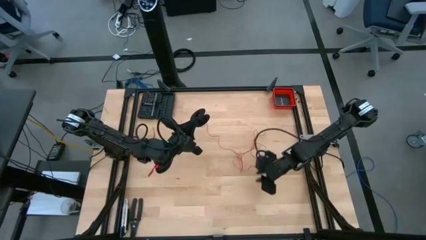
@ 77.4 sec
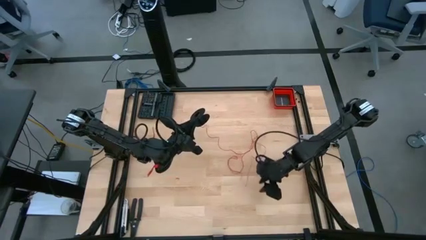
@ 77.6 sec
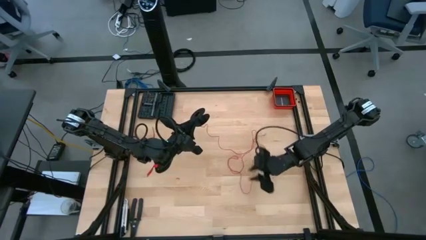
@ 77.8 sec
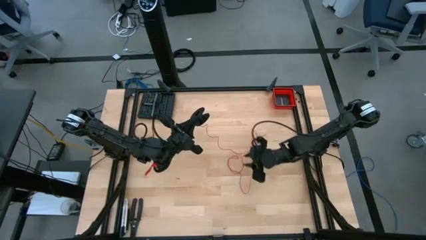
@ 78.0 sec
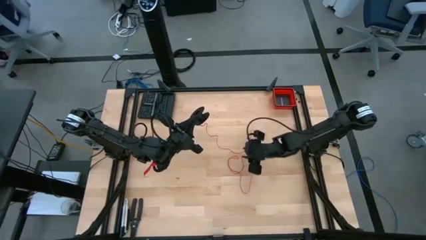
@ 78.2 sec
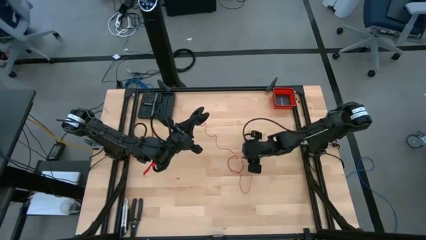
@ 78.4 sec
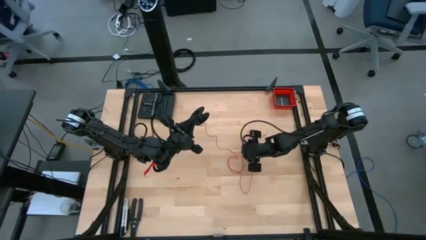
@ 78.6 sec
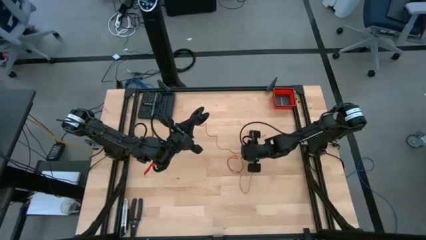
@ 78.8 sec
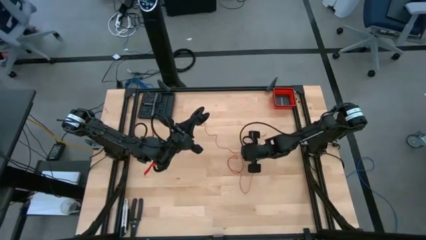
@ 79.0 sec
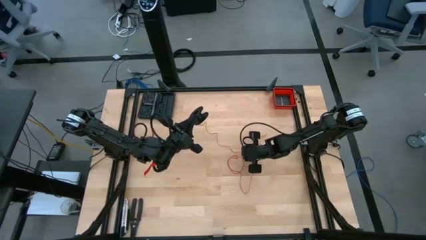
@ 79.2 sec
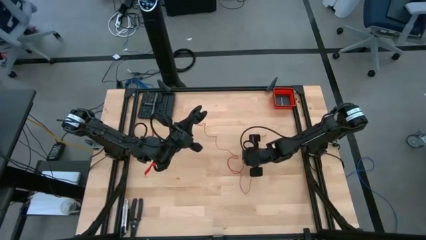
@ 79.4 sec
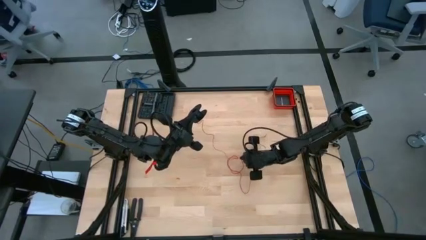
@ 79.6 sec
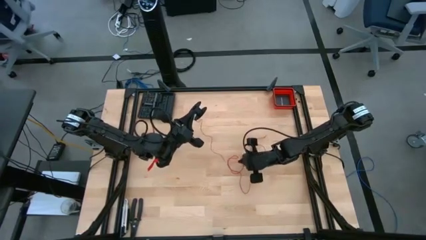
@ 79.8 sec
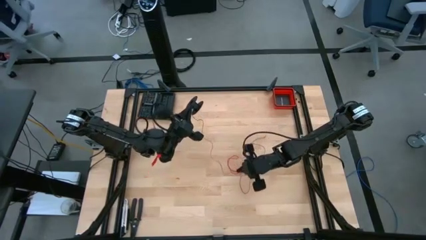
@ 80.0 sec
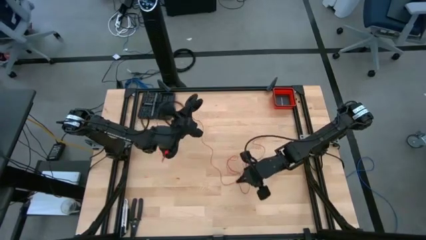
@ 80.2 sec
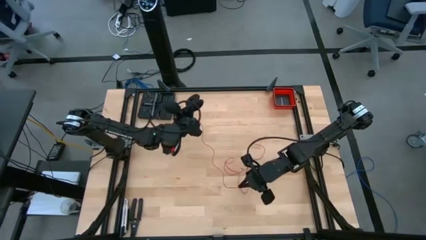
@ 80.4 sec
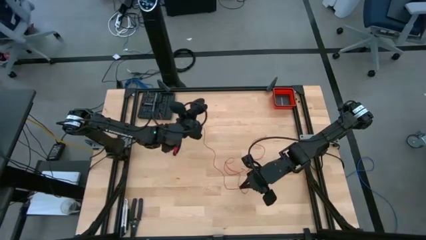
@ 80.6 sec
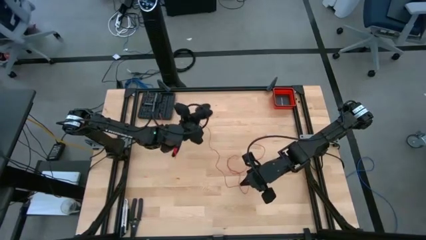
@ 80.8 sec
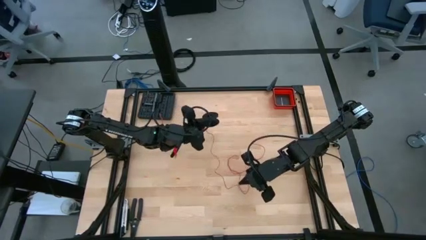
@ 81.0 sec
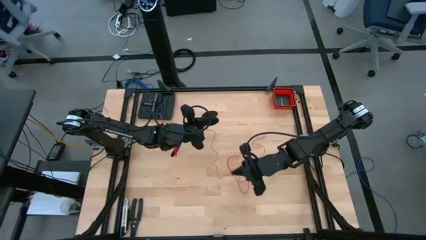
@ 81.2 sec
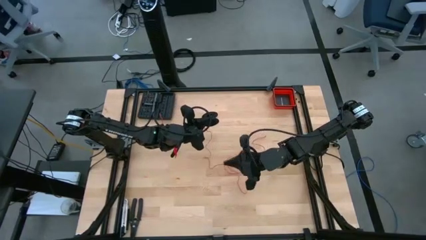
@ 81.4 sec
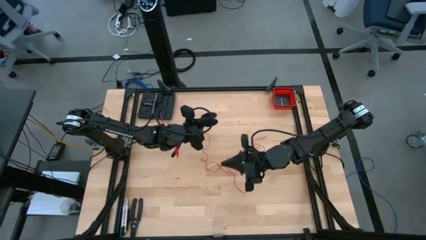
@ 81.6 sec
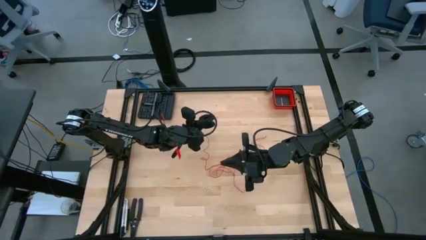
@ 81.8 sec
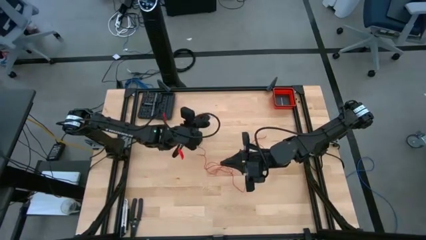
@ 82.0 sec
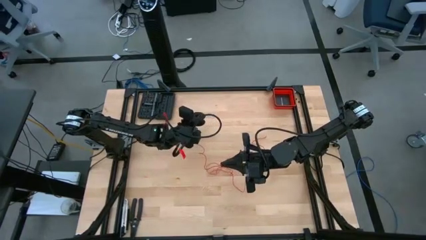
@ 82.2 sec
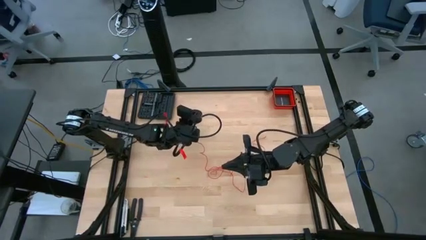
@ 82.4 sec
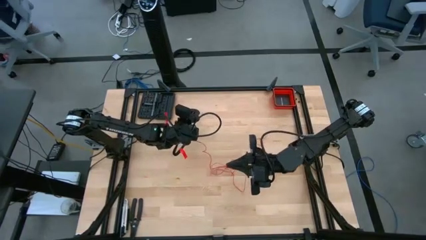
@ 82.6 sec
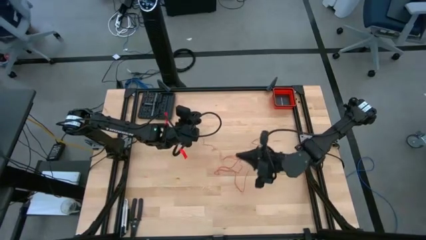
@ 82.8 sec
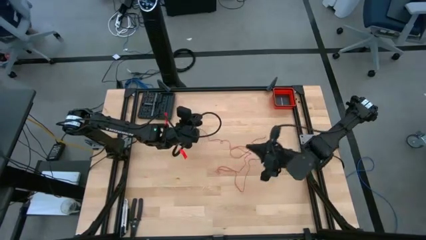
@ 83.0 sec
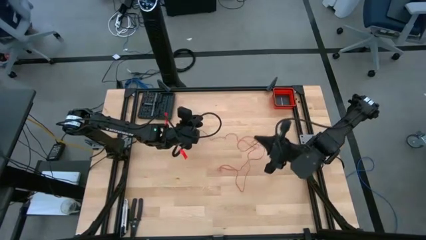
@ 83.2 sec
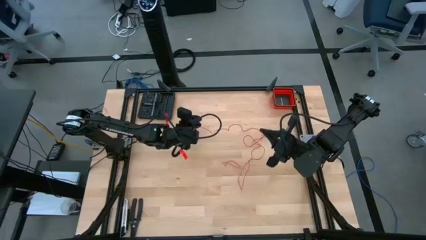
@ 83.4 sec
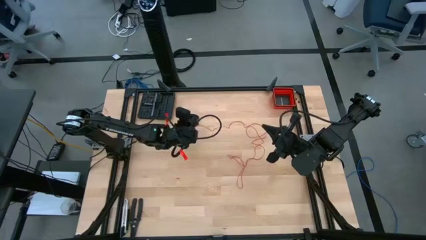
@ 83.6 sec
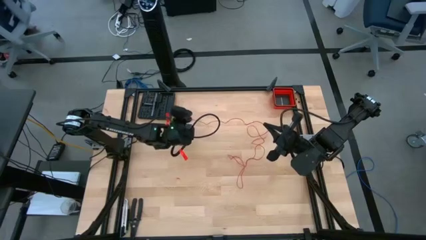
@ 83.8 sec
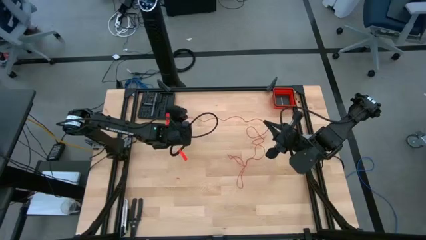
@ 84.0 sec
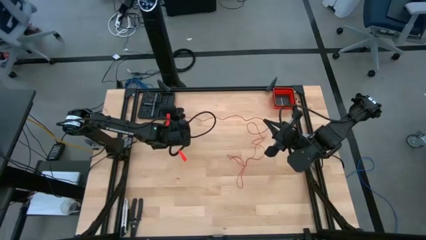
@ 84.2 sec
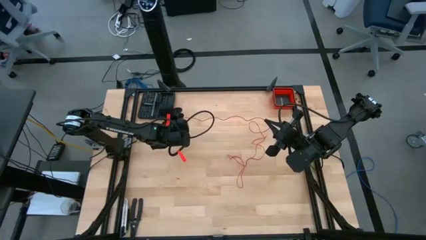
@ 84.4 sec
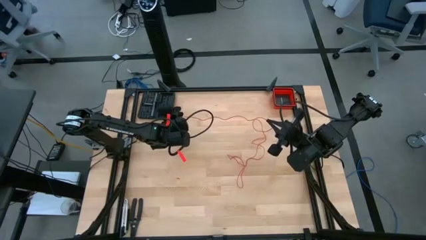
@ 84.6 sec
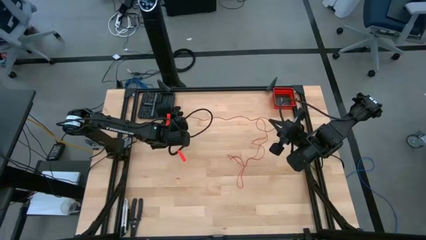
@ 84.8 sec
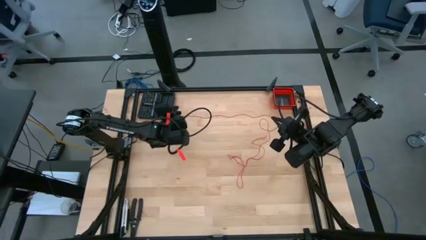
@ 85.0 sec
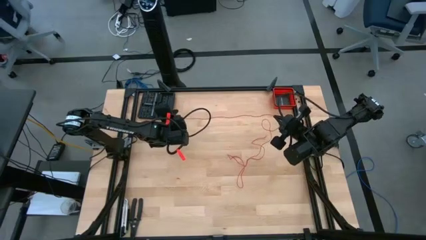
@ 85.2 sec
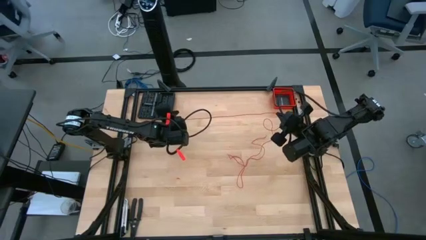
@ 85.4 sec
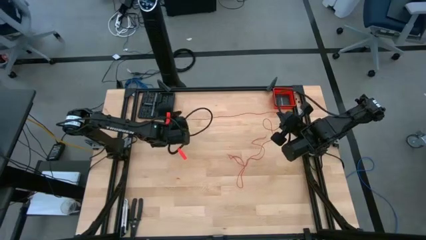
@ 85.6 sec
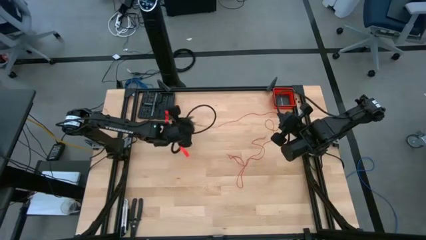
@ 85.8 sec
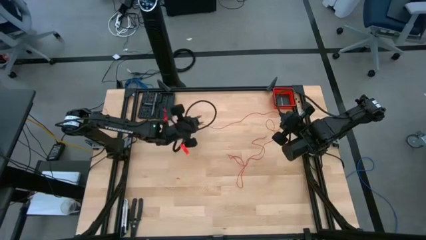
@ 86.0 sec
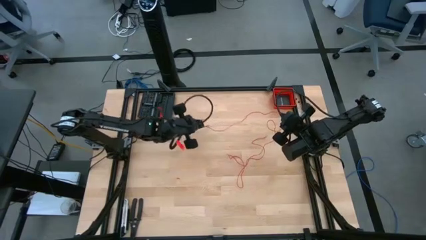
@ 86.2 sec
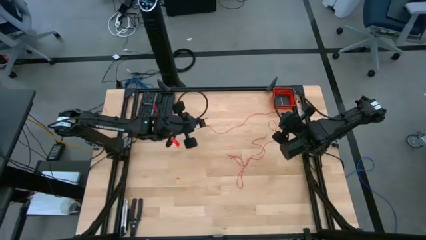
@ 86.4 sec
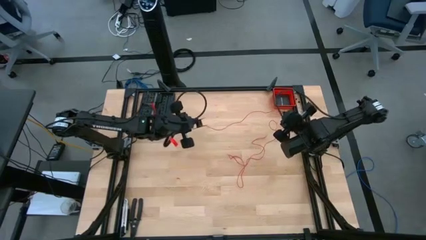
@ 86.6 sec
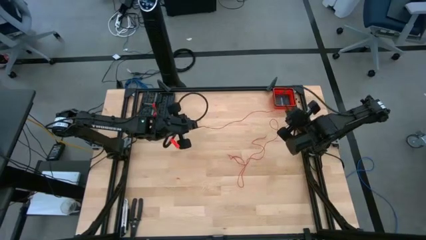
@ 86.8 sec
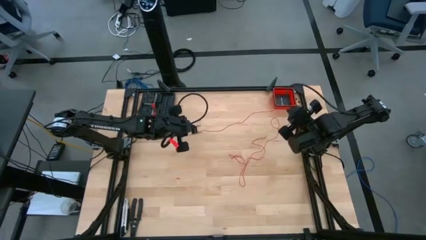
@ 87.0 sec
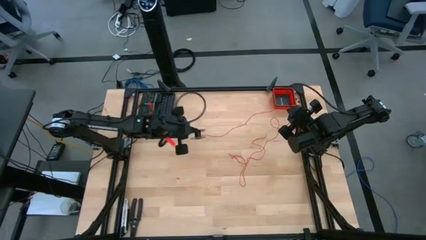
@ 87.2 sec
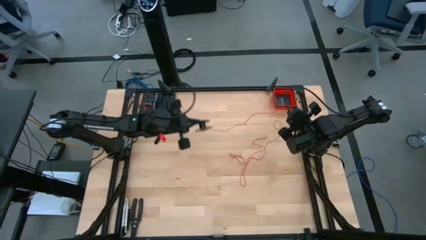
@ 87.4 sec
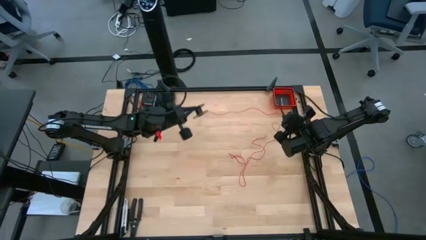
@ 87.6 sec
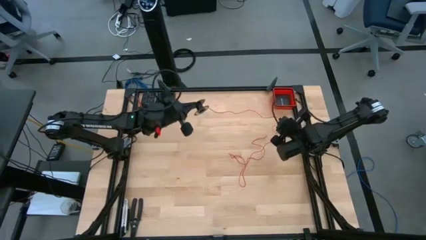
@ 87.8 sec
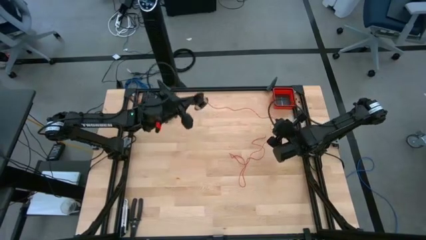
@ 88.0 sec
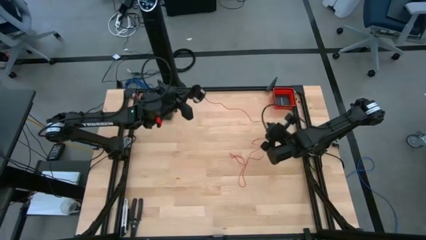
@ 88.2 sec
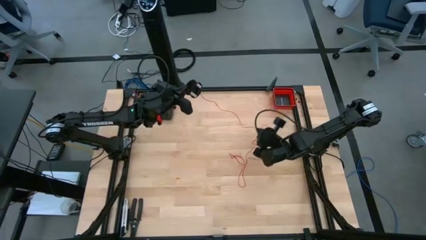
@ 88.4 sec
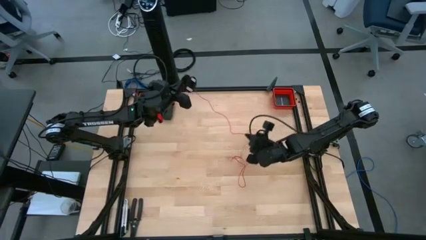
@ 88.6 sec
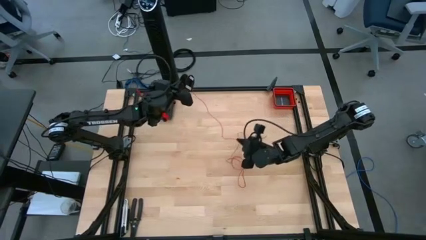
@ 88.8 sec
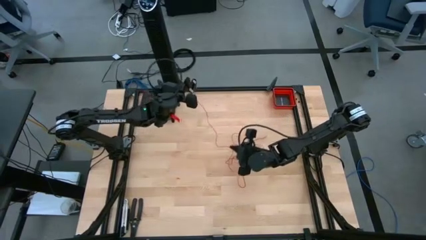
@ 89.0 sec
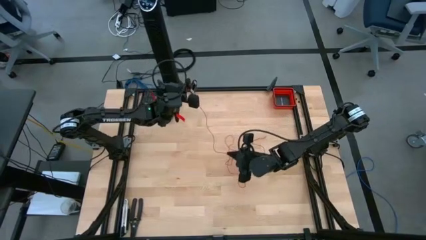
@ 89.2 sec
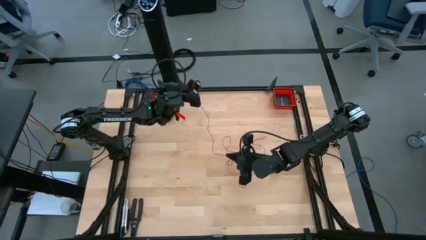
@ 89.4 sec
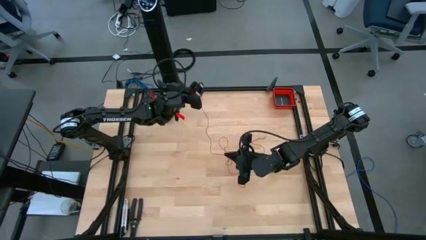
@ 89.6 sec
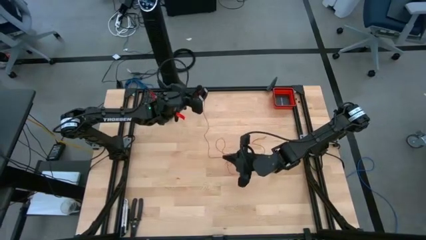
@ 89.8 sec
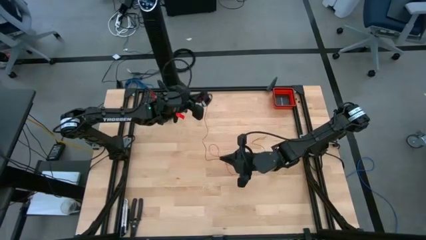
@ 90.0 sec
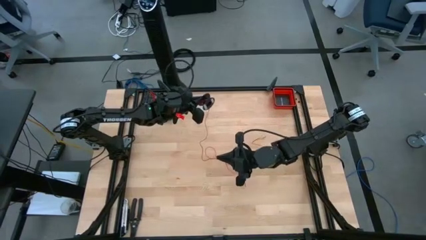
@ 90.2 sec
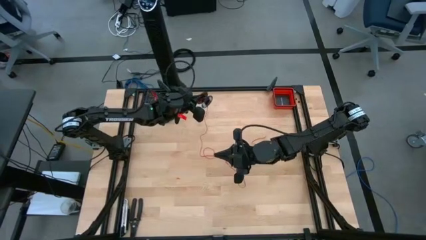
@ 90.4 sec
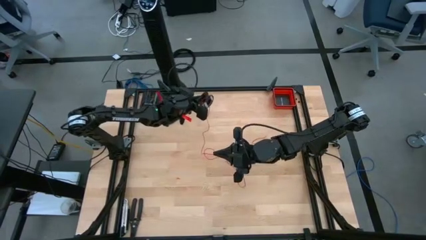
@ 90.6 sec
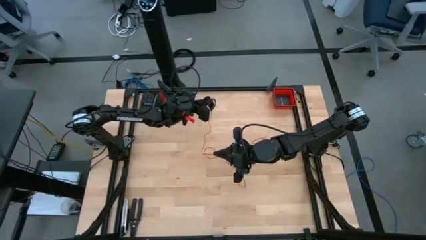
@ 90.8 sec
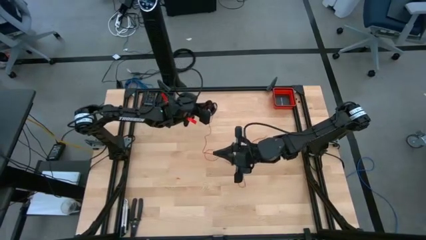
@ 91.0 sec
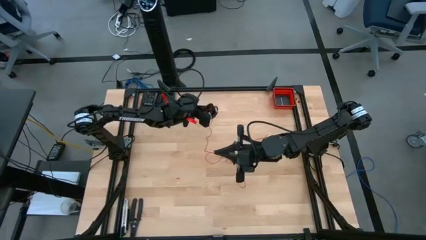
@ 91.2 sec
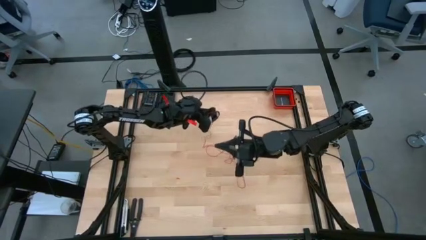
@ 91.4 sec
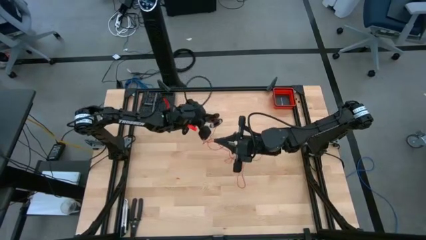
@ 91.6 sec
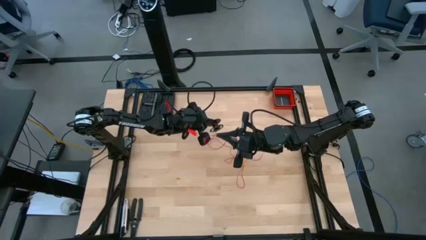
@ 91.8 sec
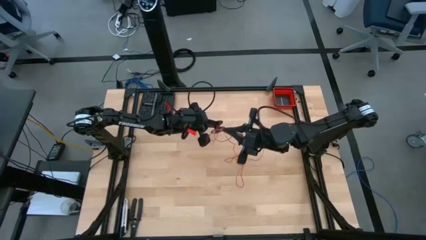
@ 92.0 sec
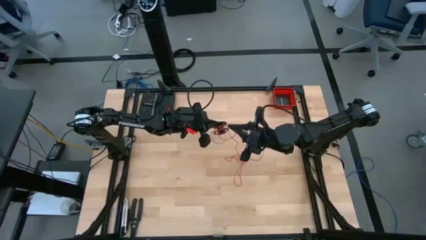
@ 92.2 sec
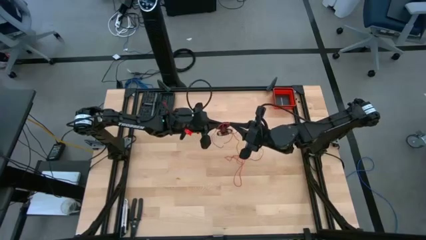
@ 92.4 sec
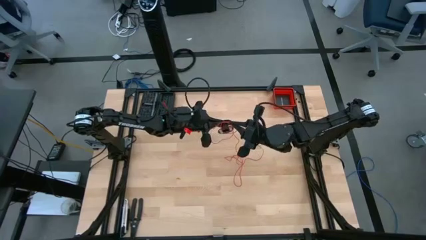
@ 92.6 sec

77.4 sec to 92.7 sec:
Task: Coil cords
Coil the red wire on the black spool
